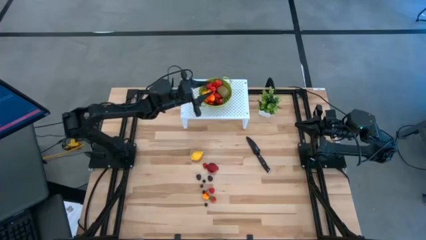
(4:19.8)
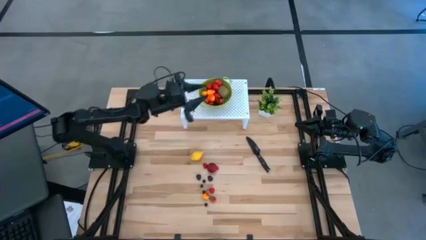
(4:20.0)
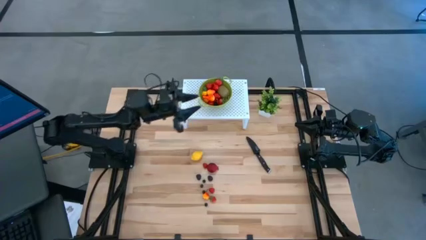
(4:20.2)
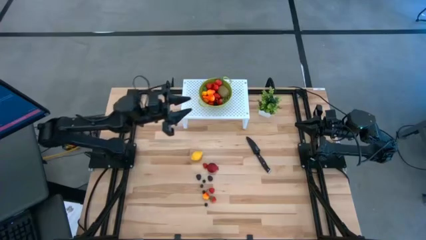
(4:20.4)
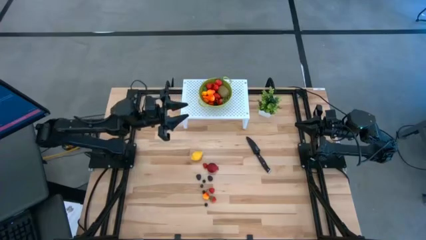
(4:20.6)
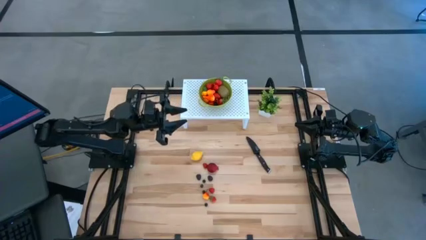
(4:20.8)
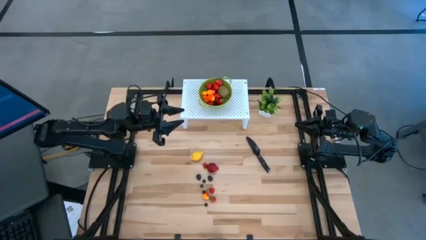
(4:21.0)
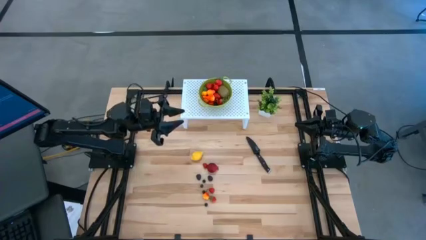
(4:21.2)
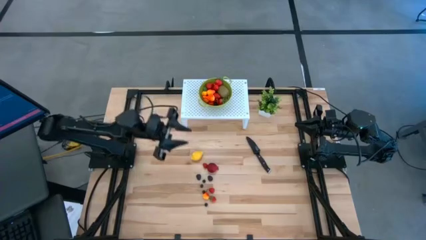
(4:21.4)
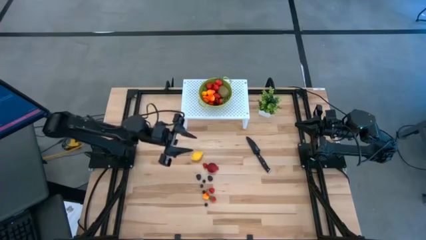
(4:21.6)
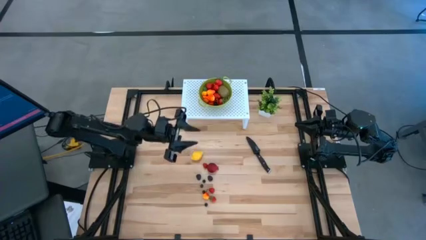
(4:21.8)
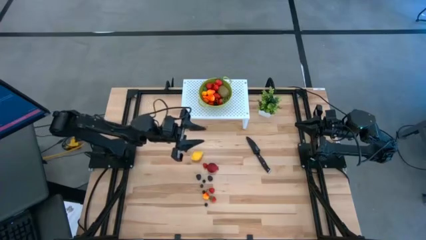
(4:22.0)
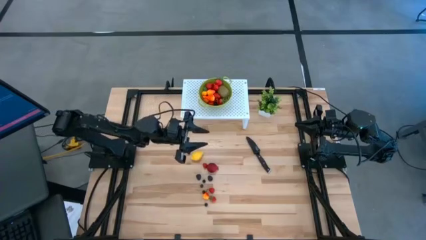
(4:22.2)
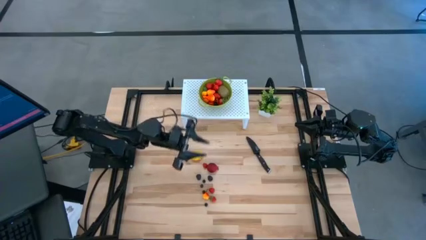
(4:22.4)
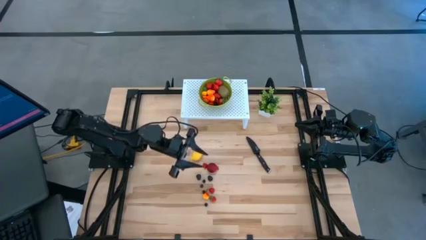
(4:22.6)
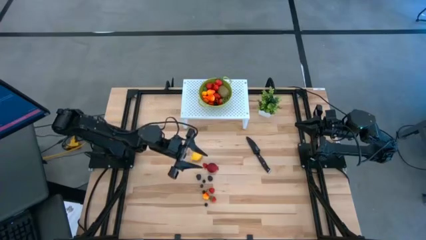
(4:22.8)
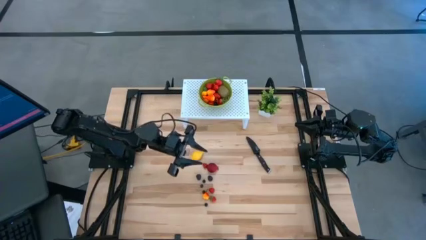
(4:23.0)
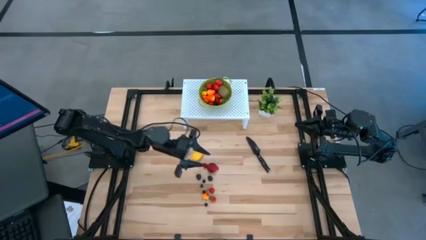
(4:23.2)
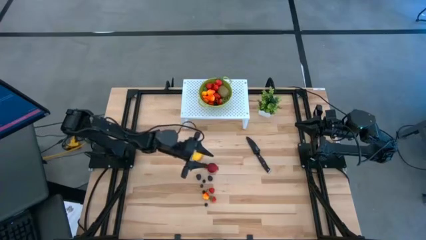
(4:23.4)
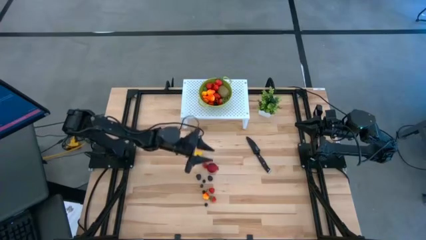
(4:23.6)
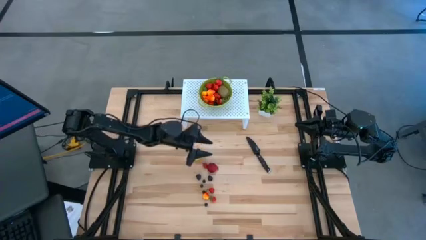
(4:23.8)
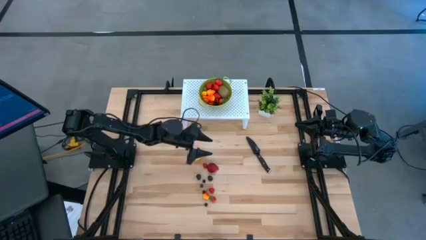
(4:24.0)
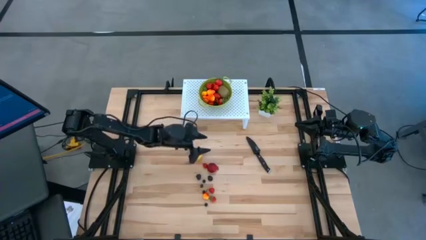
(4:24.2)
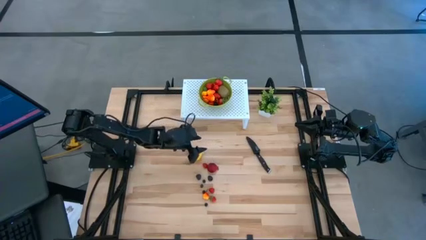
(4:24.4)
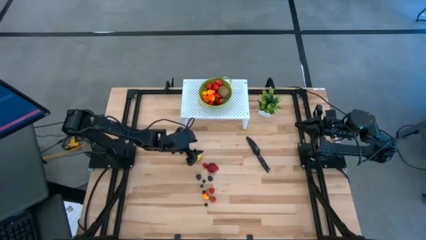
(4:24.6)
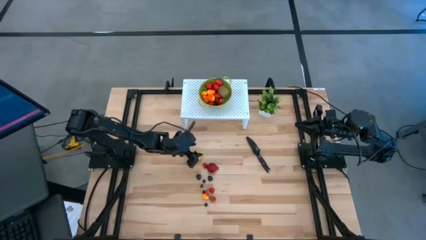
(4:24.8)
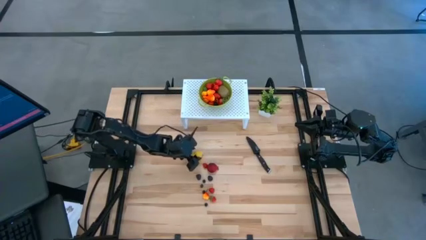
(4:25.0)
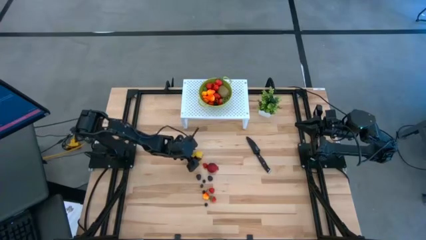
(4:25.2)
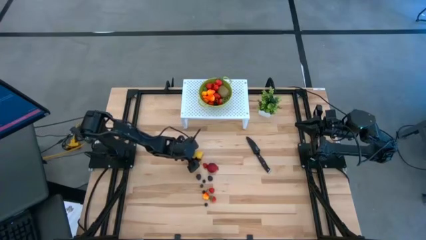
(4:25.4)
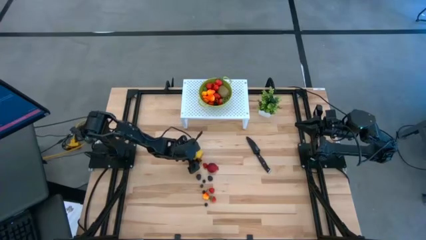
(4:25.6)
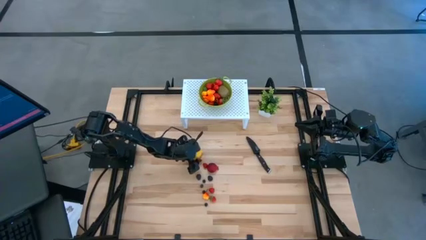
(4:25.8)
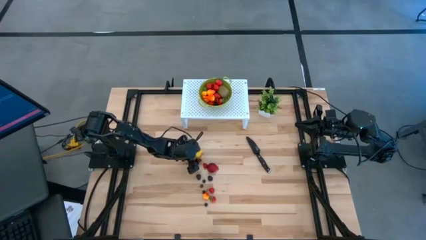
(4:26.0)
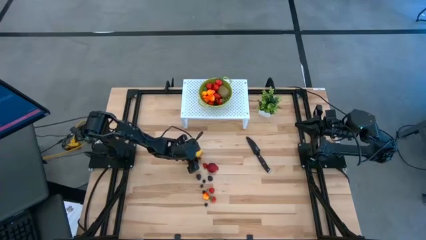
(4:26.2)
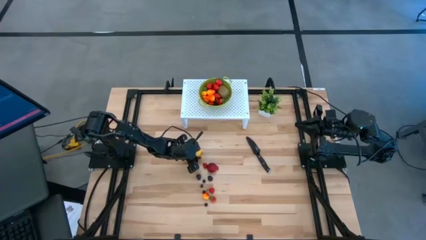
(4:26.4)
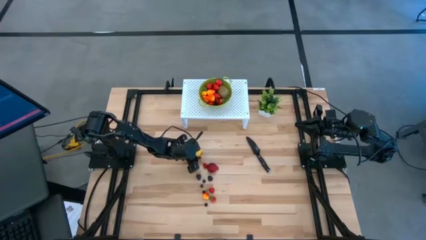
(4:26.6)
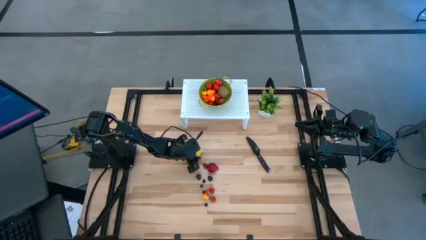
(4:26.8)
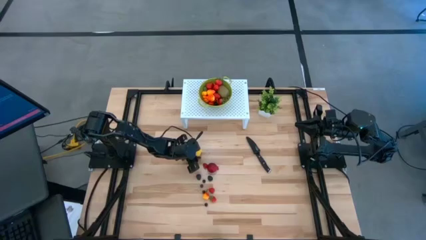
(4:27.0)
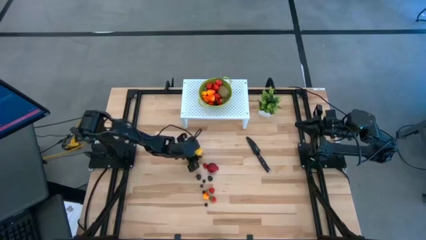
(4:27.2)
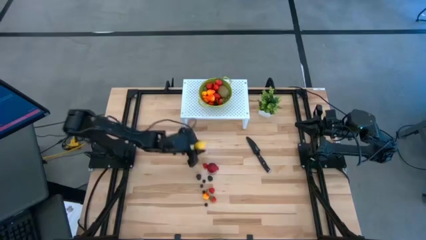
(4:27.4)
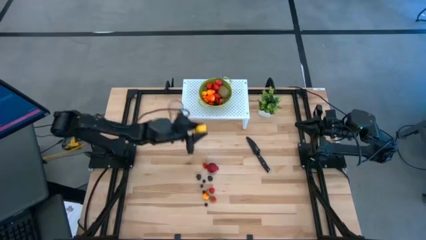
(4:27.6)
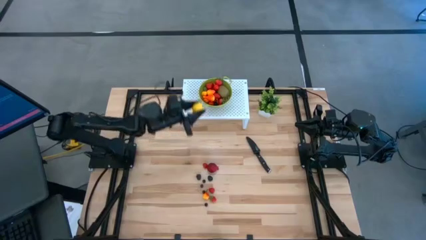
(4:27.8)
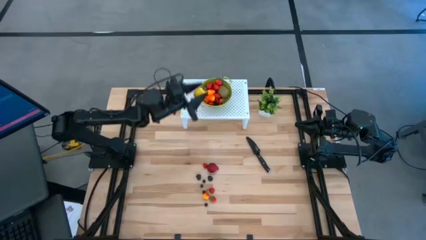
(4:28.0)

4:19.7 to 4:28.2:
Task: Pick & Place Fruit
Put the yellow lemon into the green strainer bowl

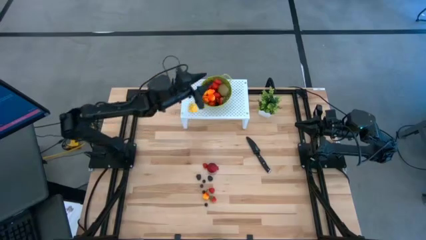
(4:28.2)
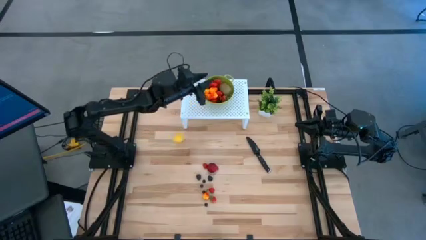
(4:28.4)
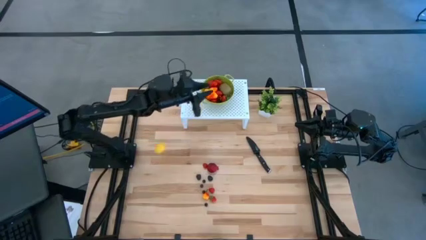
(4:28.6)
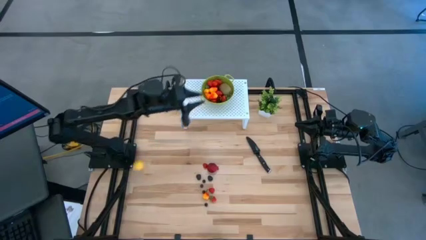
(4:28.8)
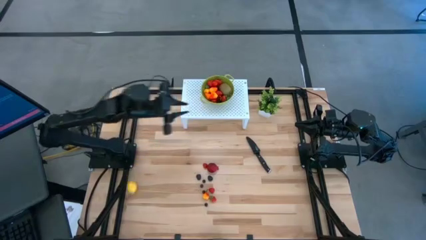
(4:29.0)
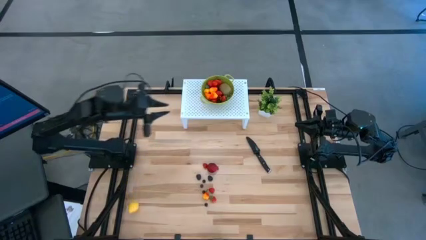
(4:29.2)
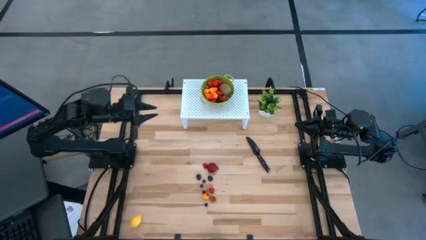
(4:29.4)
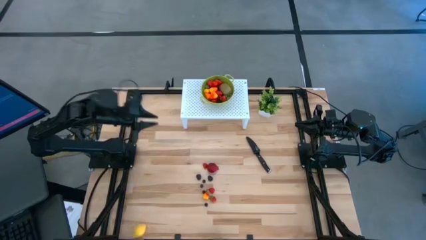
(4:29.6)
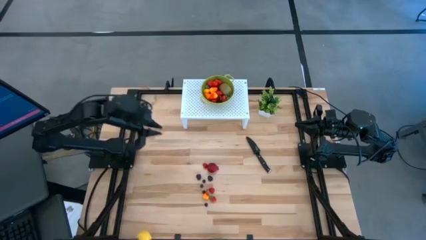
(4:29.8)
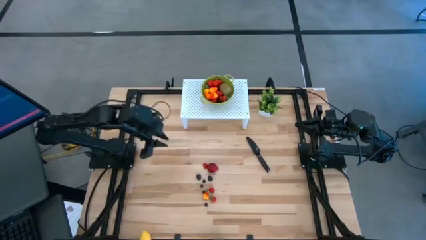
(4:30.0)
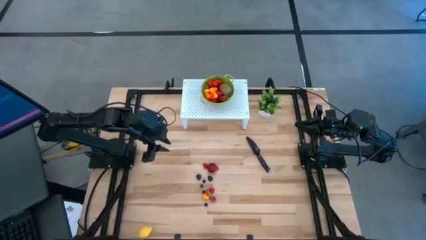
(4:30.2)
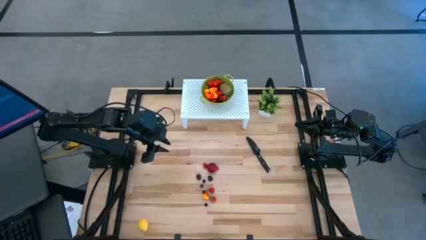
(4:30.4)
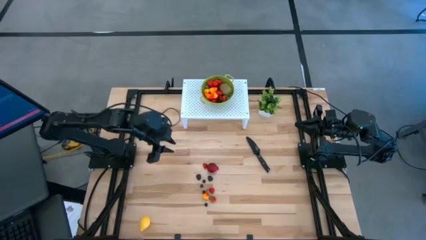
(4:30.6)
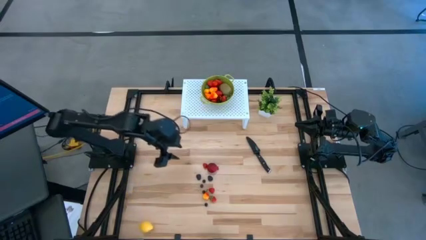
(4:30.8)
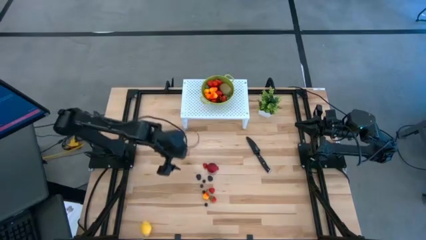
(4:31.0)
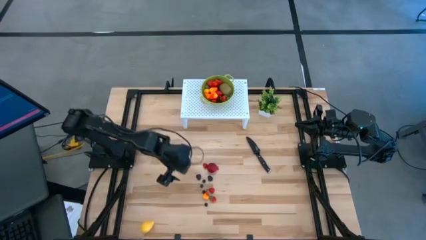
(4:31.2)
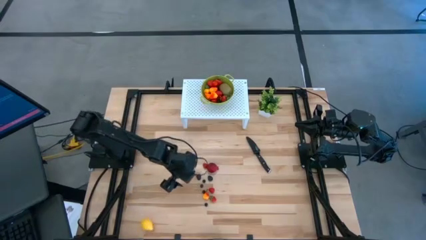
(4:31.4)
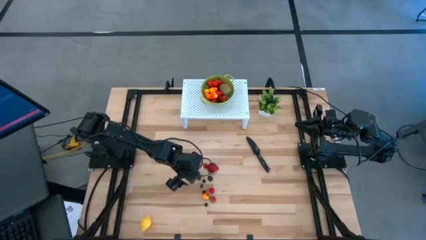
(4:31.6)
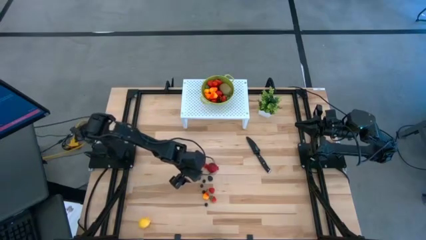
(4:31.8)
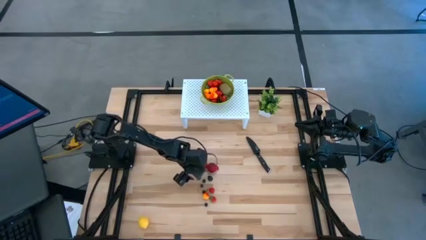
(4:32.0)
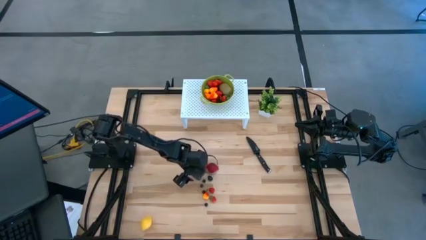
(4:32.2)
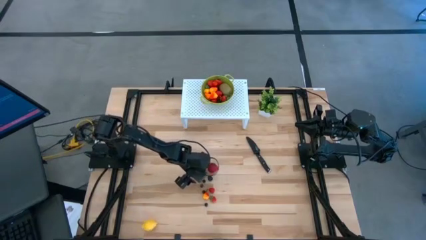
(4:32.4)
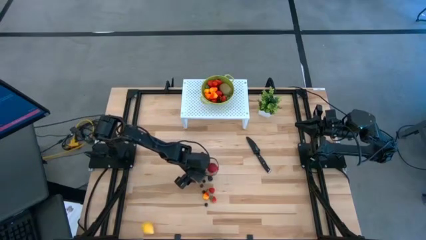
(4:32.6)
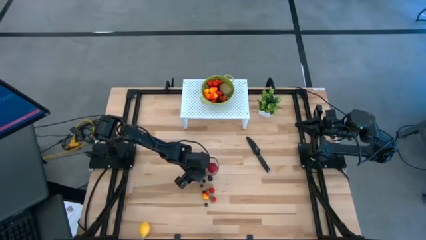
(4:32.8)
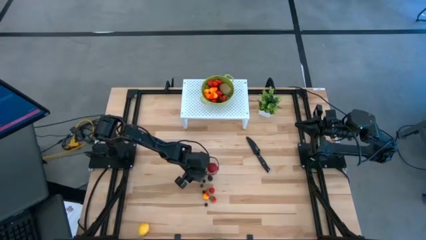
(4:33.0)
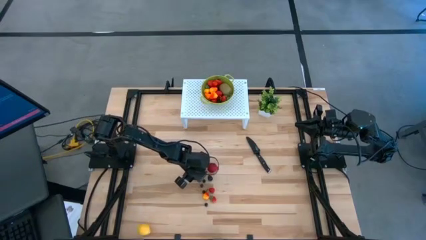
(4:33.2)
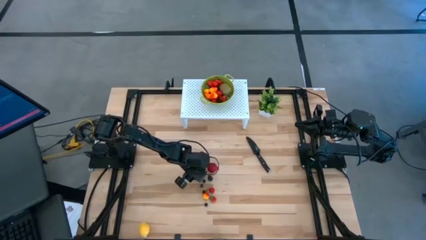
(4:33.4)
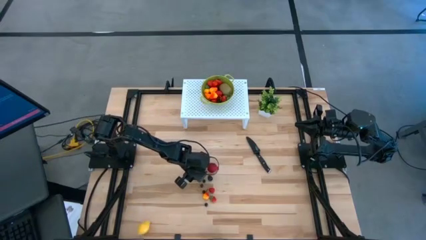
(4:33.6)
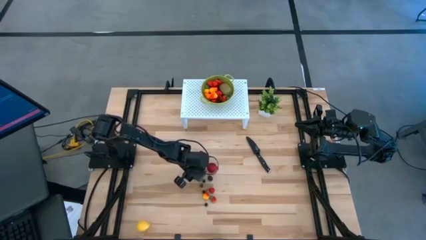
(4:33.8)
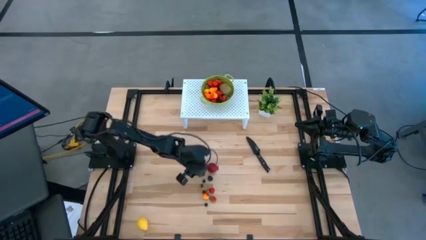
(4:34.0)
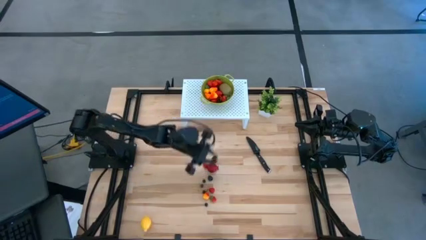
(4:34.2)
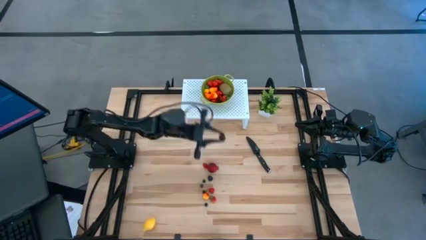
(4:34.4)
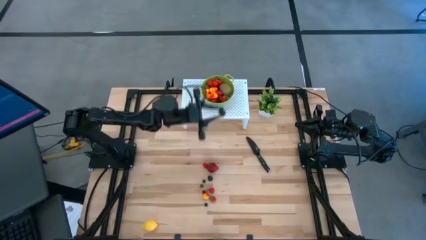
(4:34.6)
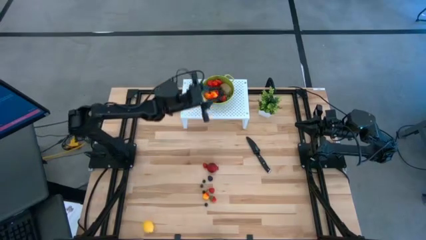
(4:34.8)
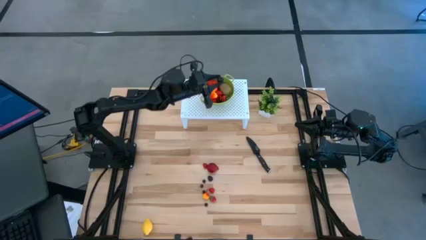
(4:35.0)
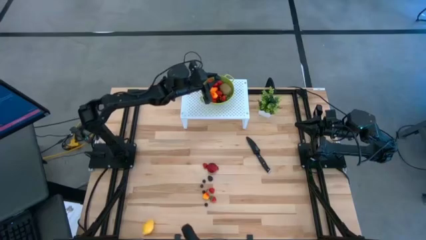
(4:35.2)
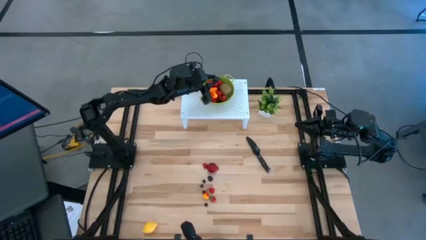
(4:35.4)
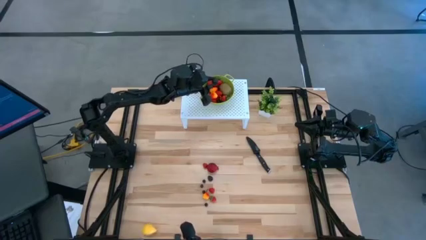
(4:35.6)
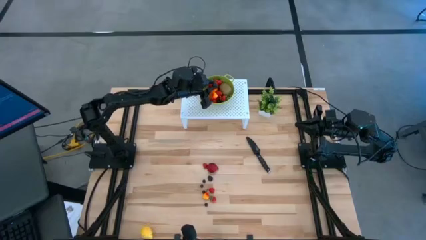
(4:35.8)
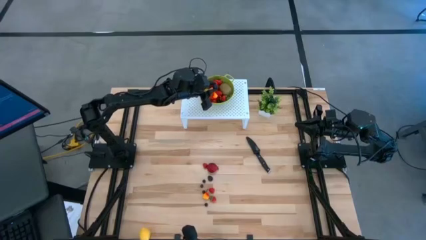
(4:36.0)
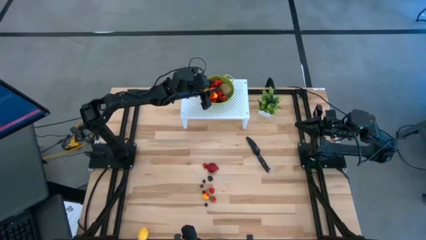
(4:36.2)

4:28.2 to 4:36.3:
Put the black raspberry into the green bin

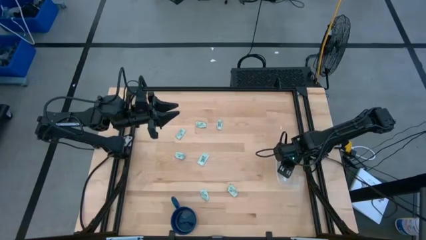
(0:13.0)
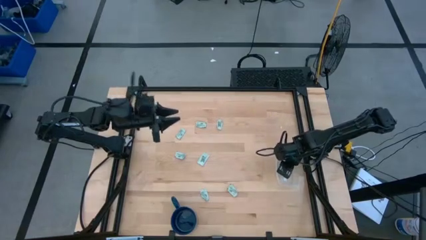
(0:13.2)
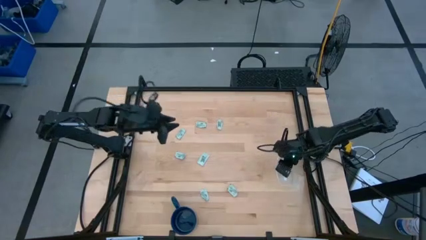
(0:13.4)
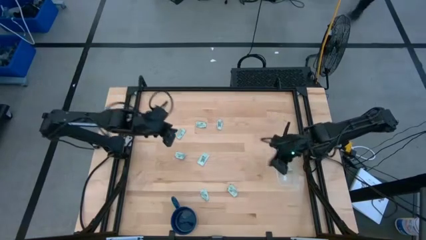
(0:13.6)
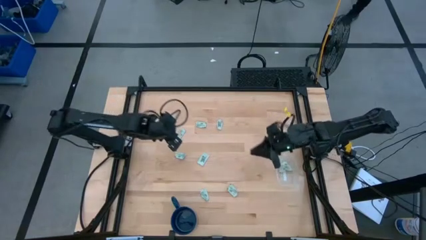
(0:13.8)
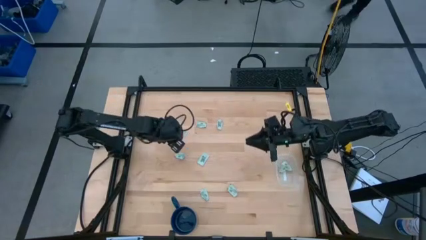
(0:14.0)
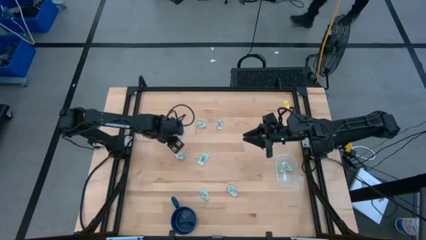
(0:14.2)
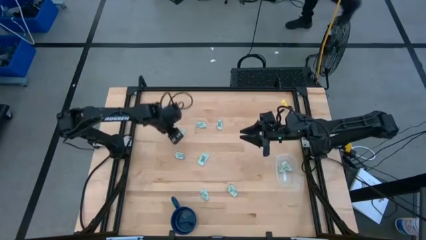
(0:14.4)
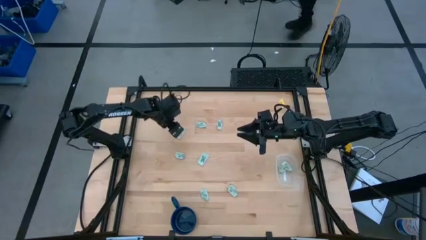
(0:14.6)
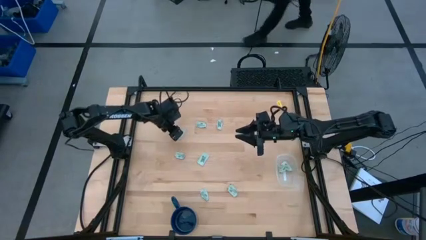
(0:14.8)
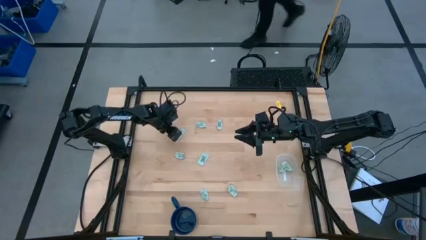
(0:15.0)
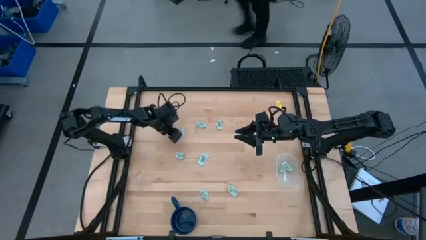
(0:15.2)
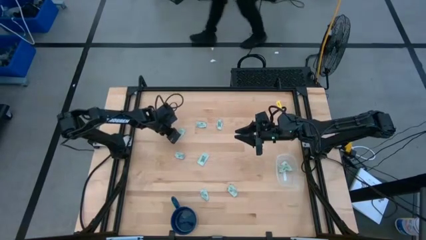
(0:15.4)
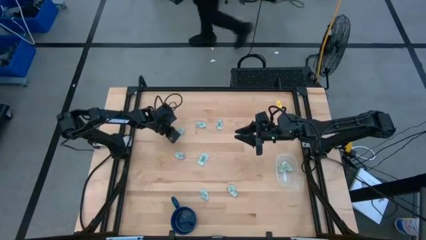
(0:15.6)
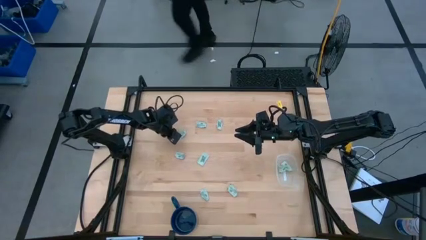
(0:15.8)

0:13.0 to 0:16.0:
Task: Pick and place Stevia / Truvia into bins
Put the green stevia packet into the transparent container
